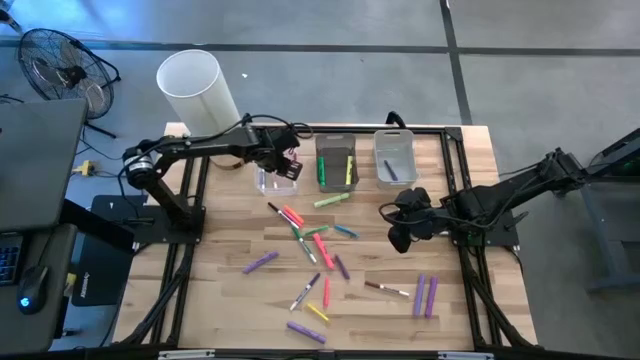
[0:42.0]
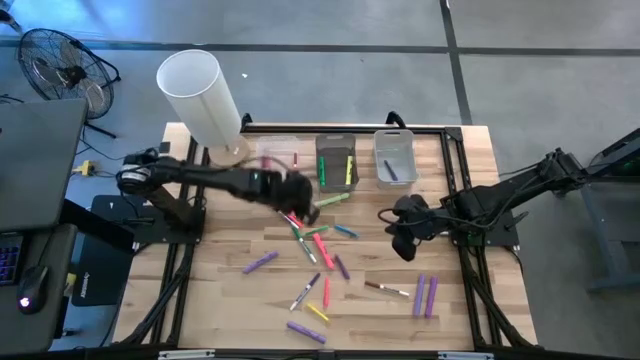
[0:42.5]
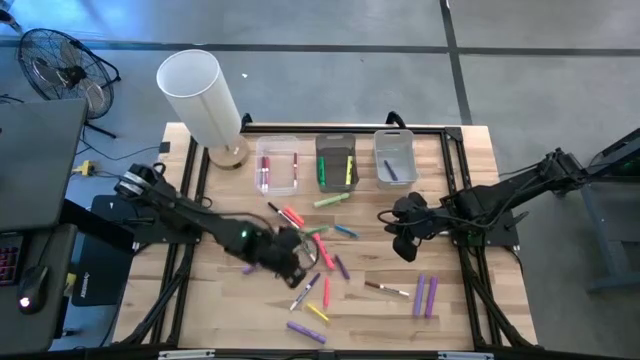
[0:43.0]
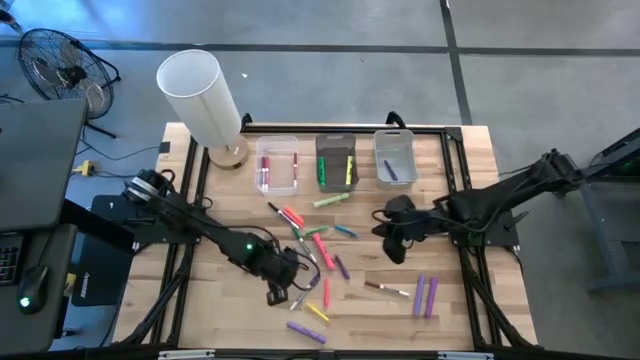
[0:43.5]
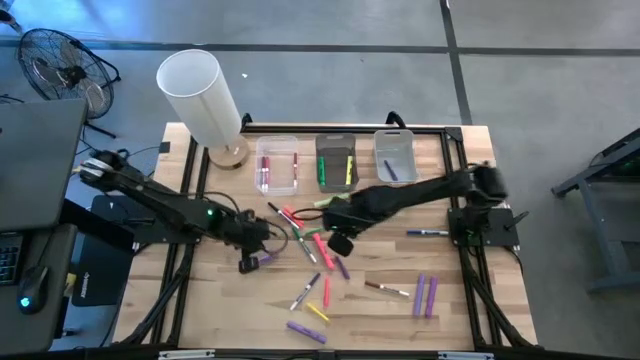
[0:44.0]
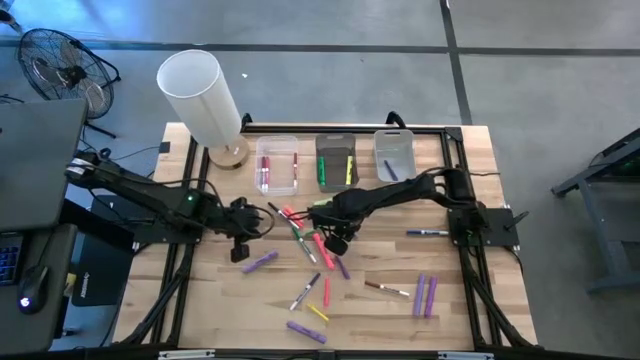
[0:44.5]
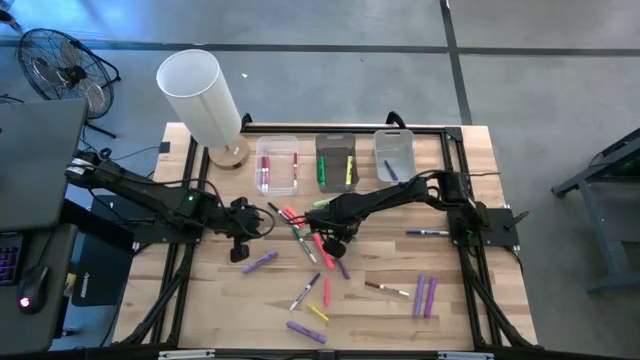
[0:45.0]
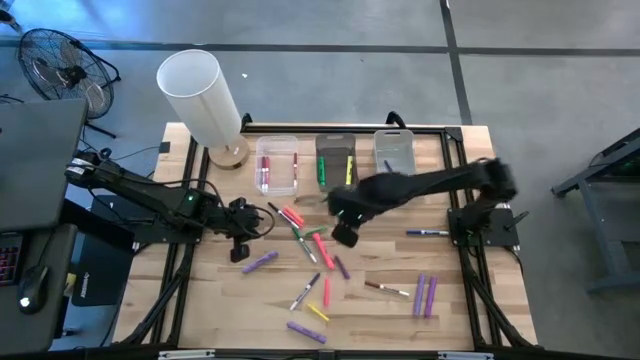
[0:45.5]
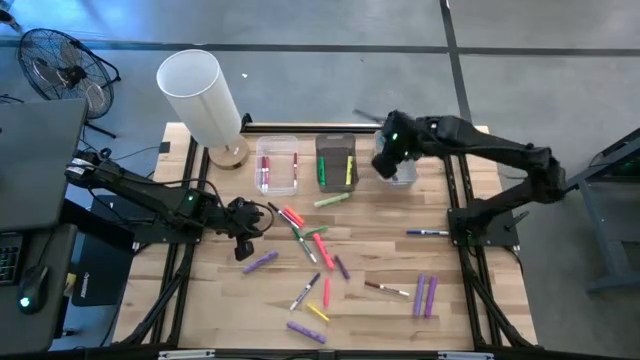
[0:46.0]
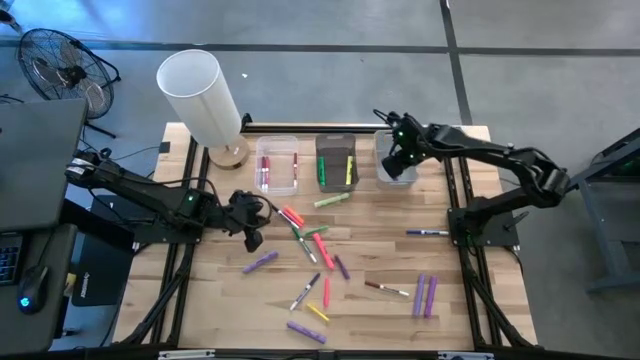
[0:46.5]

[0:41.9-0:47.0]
Task: Pick & Place Markers
Put the blue pen into the gray bin

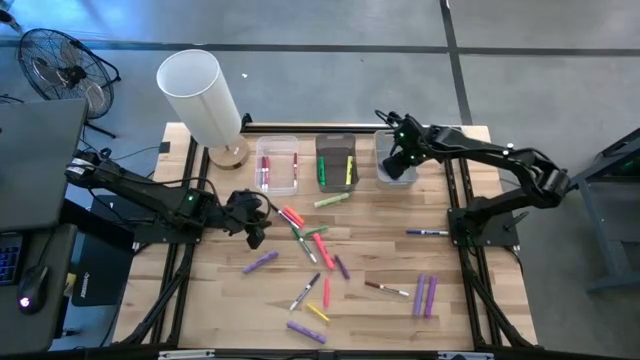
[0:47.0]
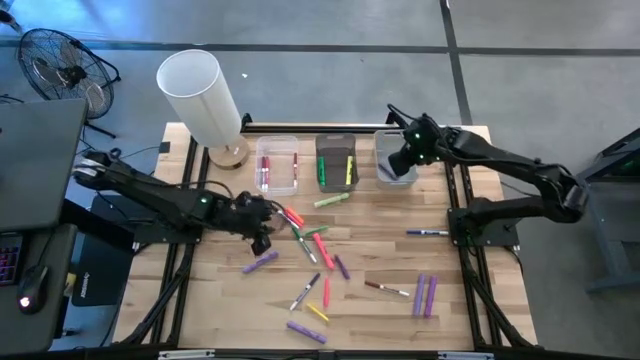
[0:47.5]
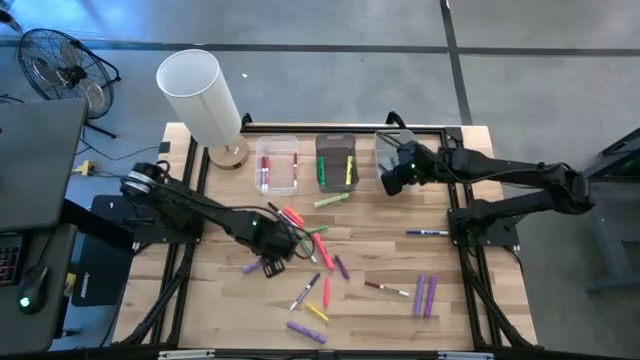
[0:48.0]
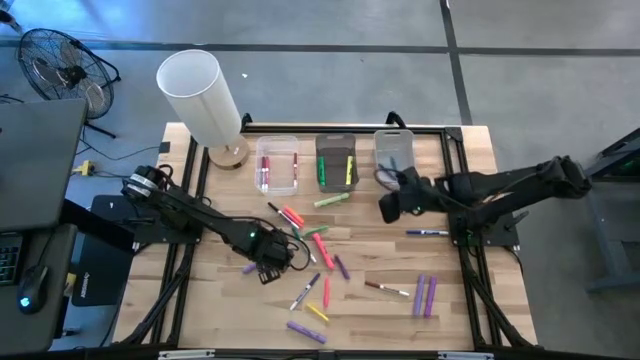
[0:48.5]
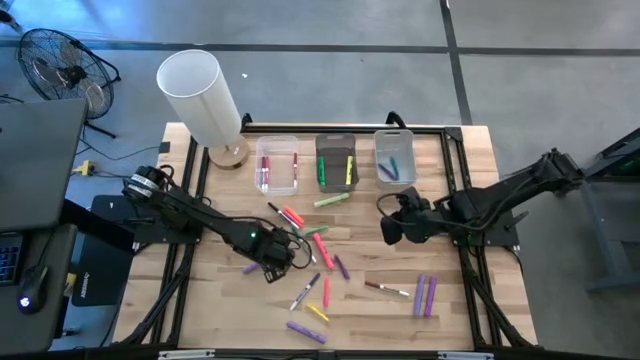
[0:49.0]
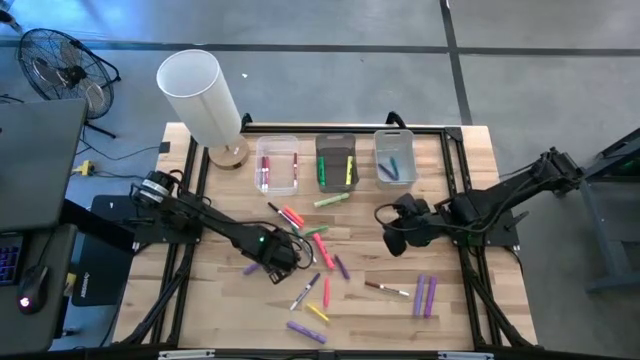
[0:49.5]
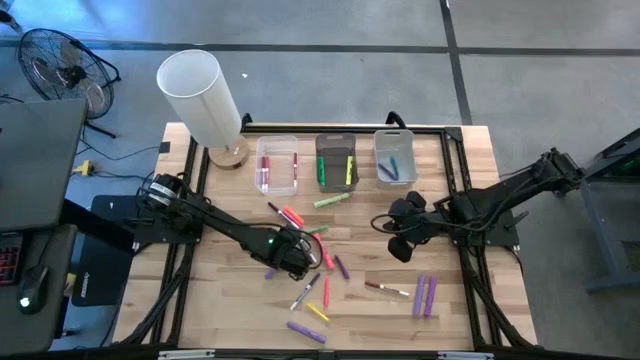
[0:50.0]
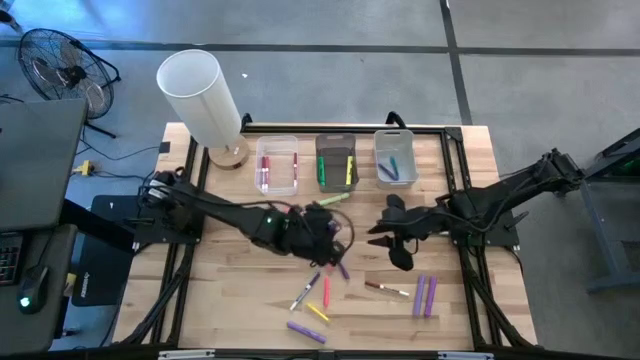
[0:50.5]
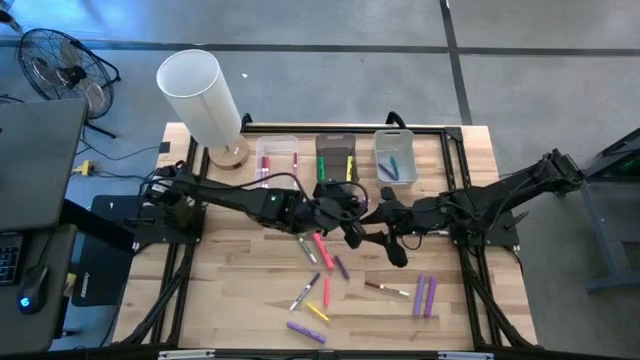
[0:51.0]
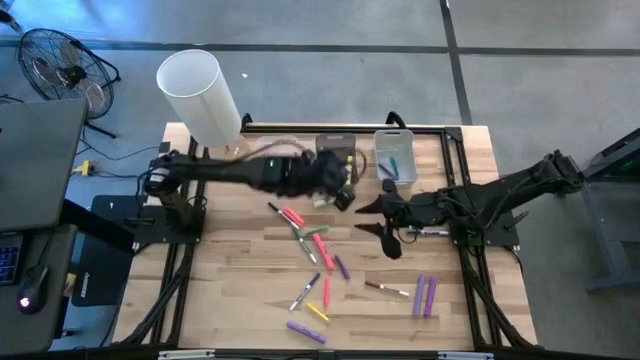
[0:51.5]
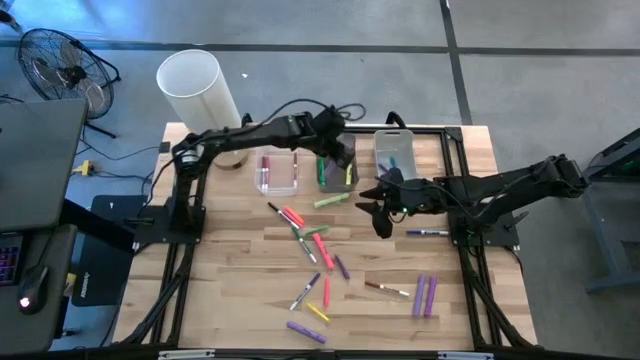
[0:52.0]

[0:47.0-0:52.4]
Put the left violet highlighter into the black bin

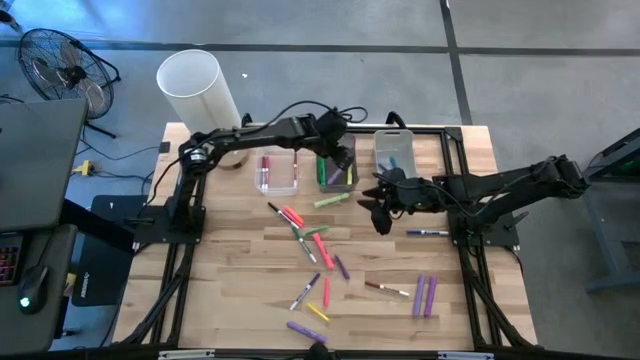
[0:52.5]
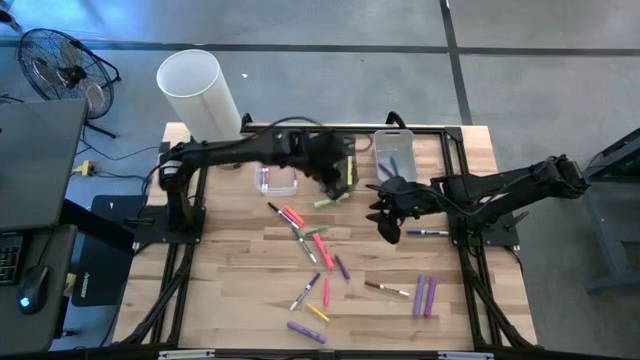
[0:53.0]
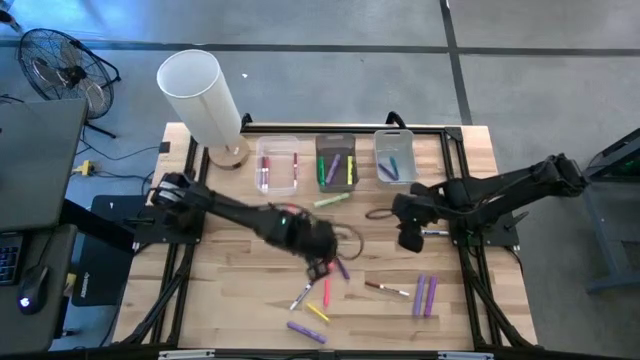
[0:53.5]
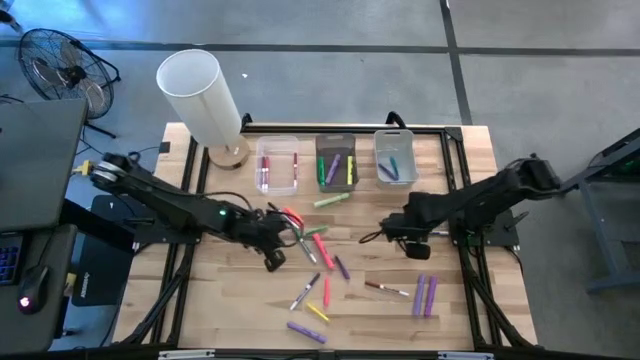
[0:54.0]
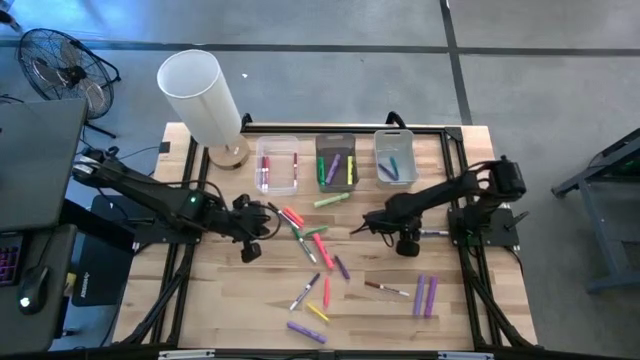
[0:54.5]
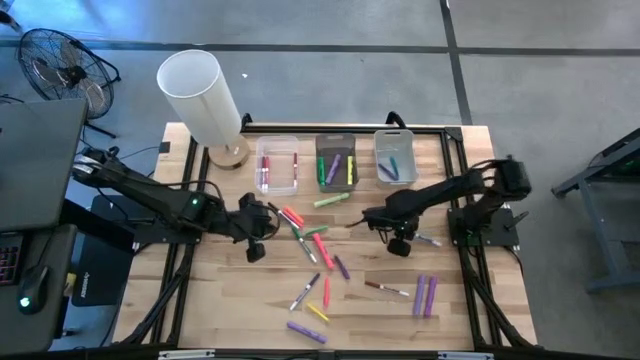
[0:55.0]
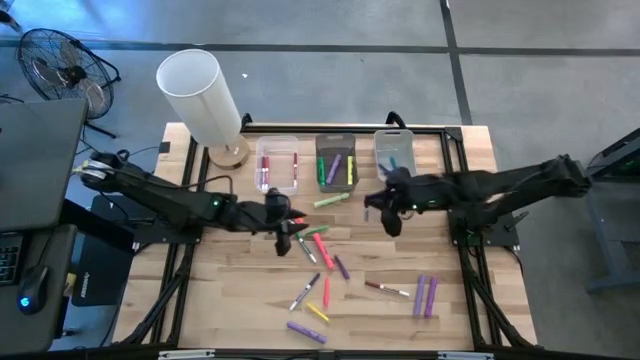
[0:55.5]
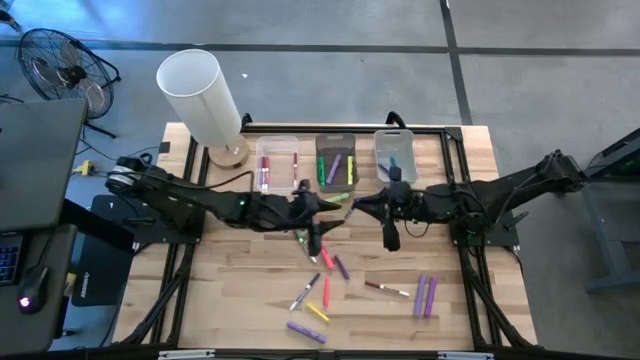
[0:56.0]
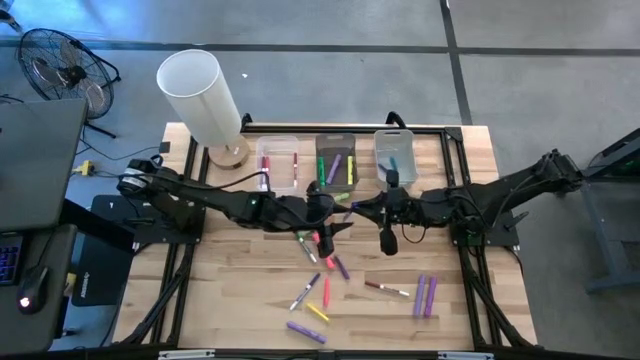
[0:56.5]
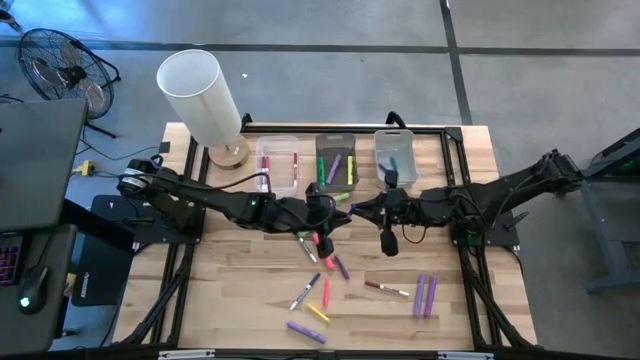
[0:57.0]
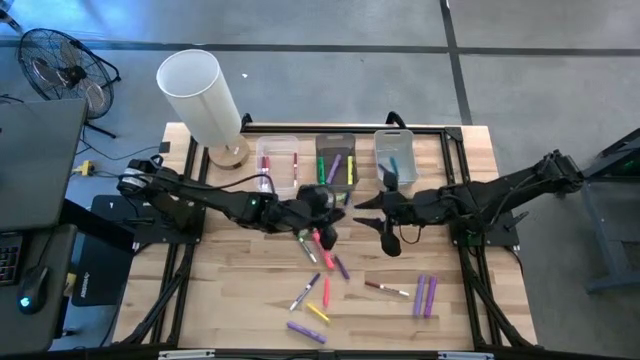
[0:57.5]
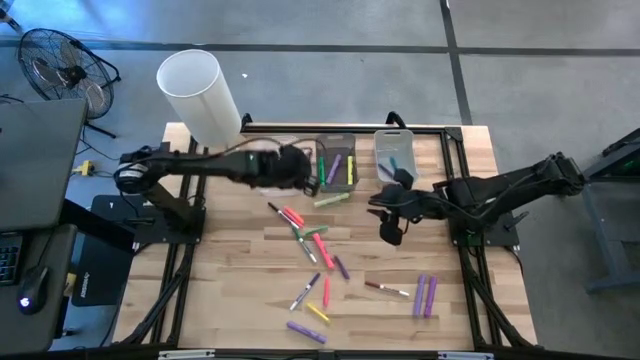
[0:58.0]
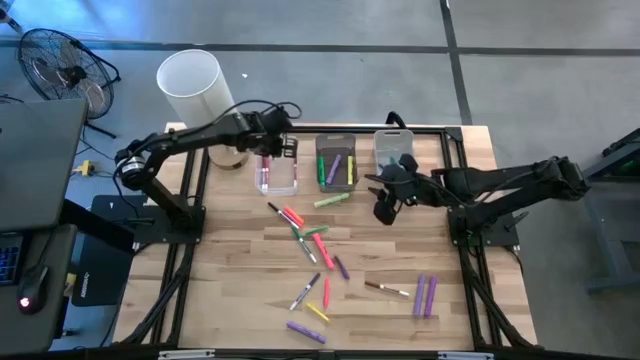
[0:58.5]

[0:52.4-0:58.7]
Put the blue dry erase marker into the transparent bin

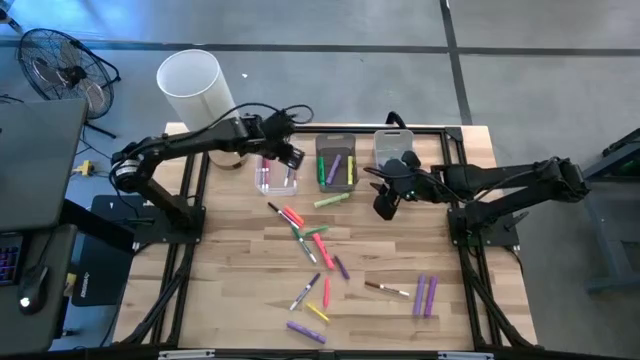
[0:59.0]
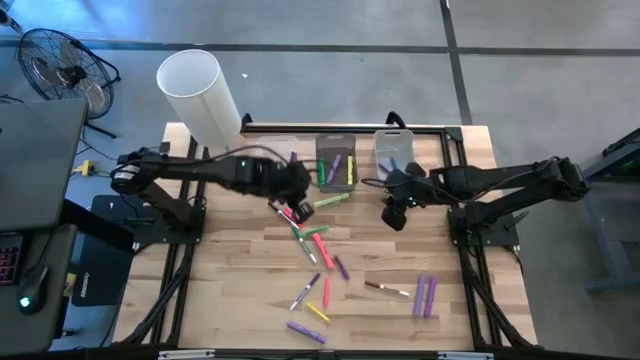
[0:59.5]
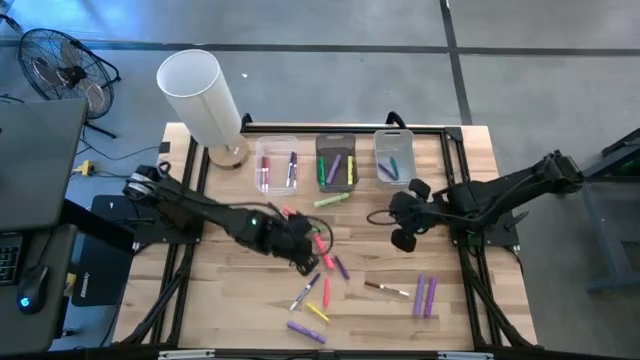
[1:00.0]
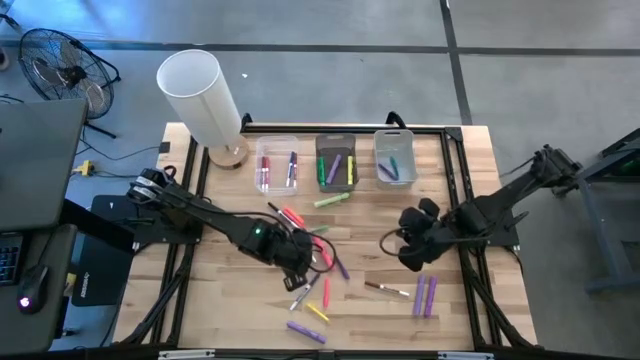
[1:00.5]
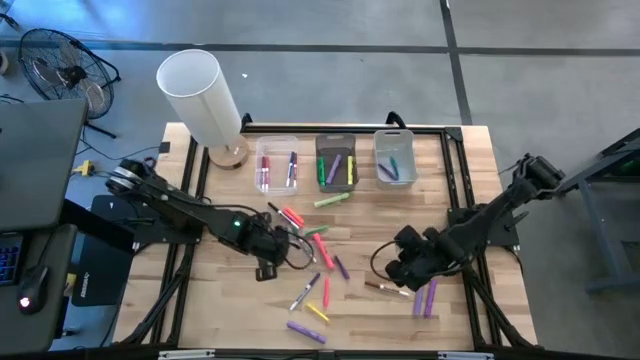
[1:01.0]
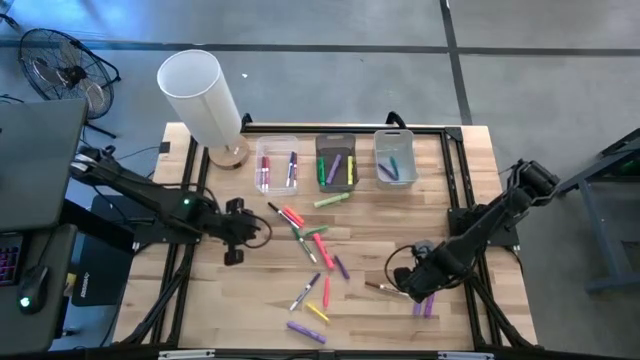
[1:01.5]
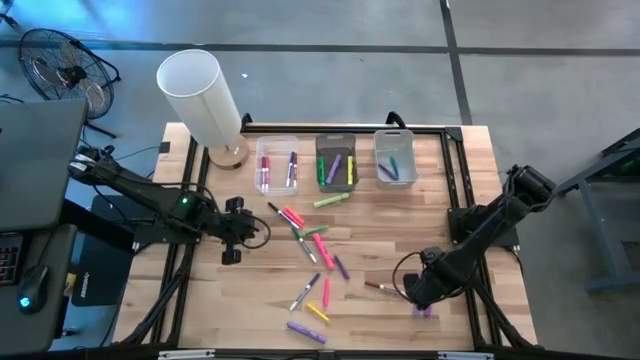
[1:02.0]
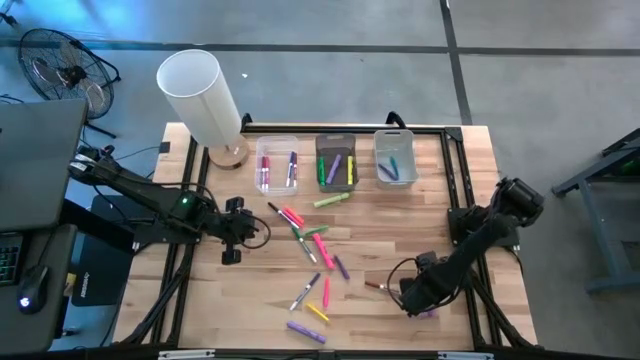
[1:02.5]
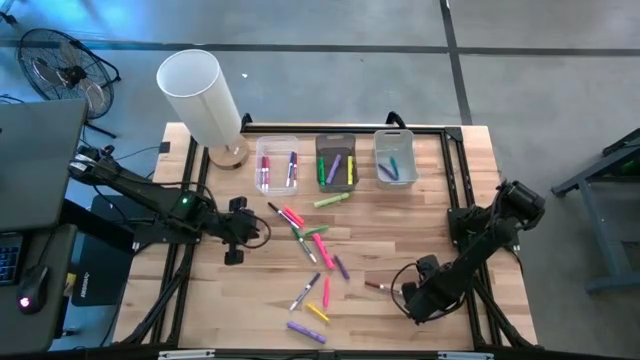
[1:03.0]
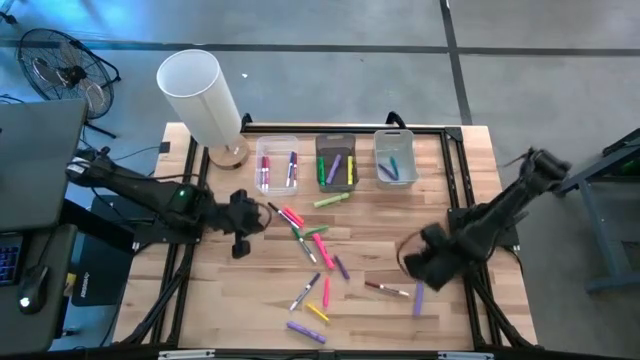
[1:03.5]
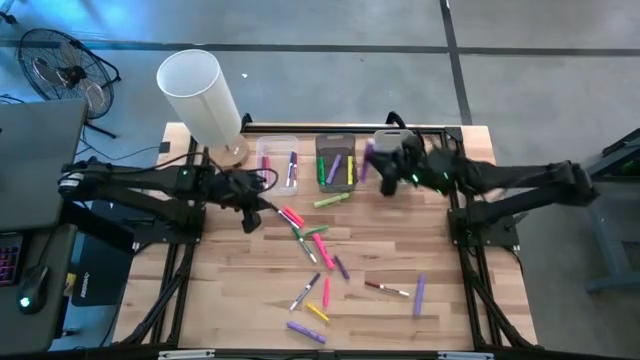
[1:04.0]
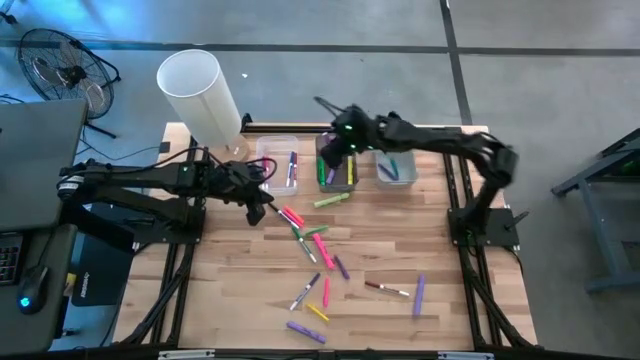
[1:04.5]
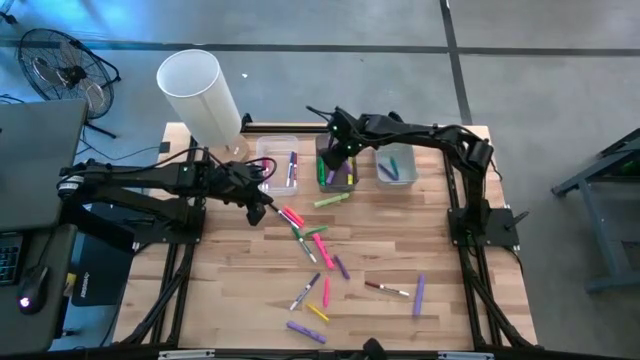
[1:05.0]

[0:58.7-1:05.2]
Put the purple highlighter into the black bin
